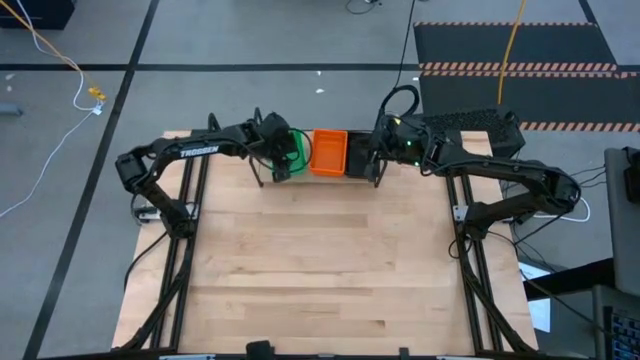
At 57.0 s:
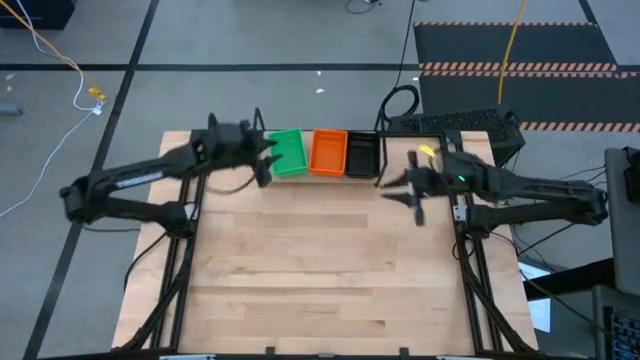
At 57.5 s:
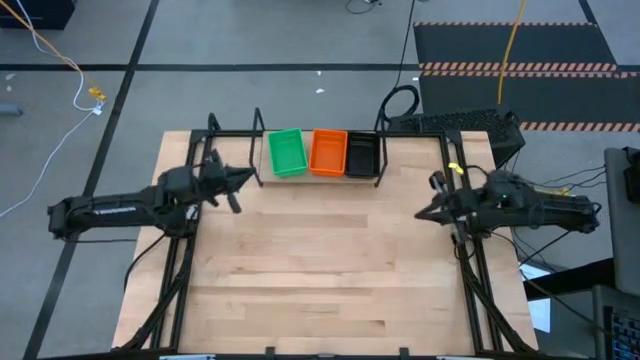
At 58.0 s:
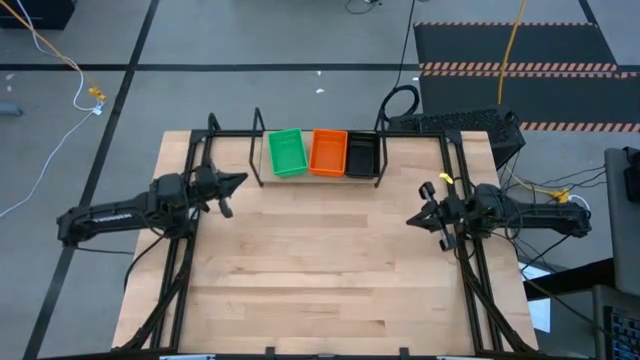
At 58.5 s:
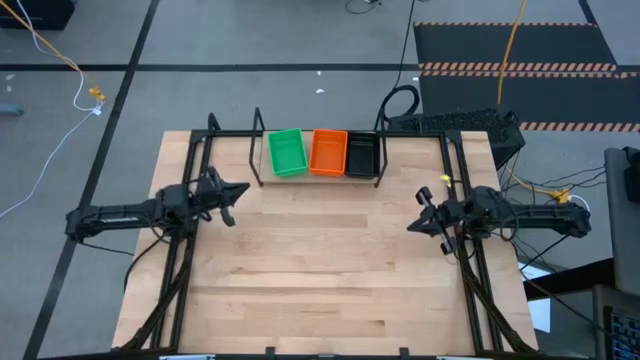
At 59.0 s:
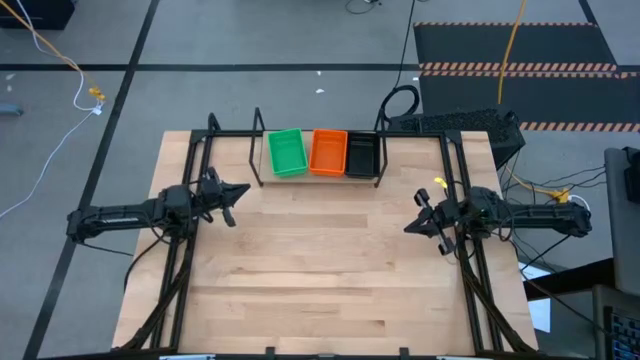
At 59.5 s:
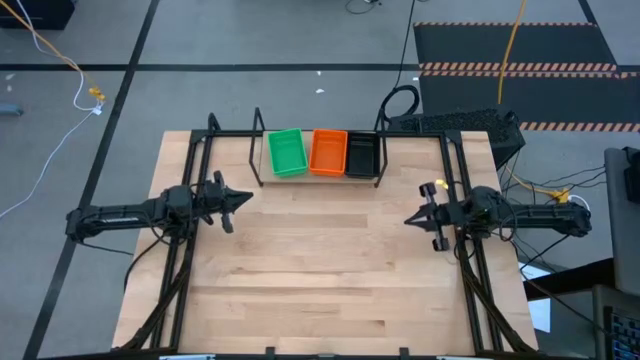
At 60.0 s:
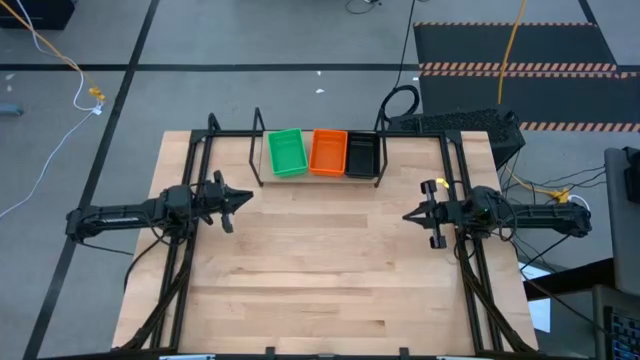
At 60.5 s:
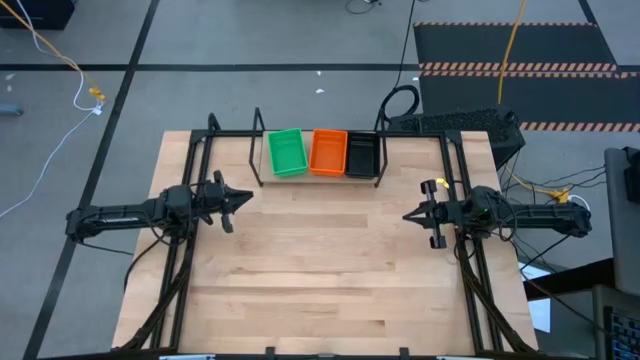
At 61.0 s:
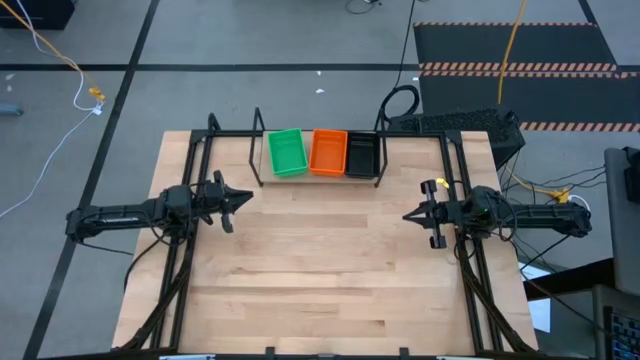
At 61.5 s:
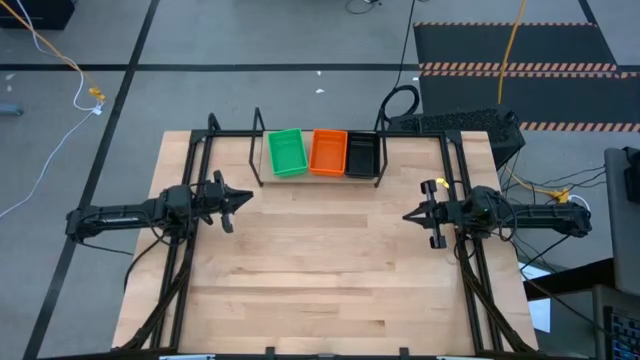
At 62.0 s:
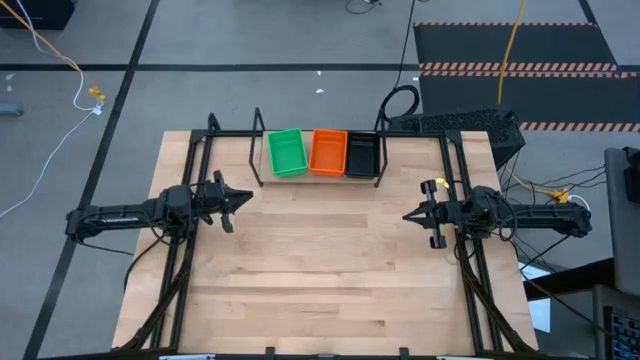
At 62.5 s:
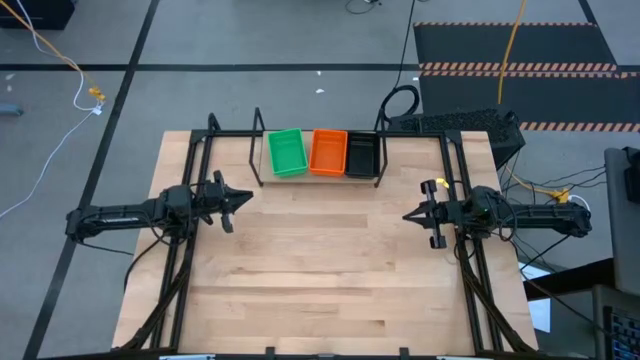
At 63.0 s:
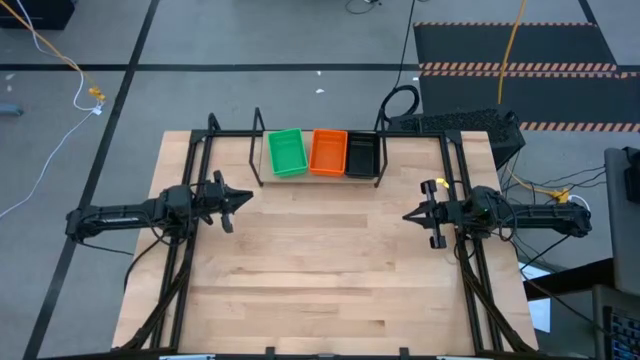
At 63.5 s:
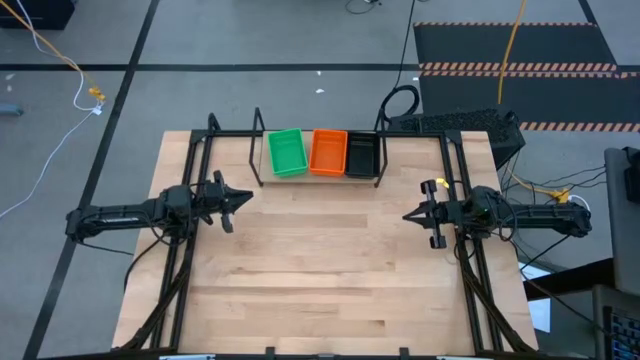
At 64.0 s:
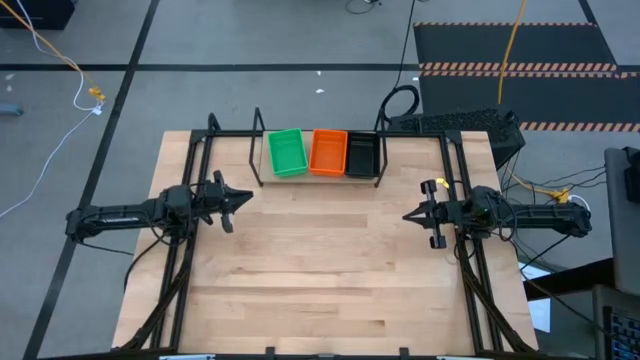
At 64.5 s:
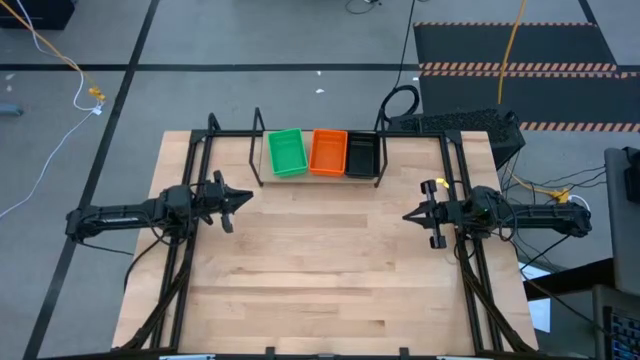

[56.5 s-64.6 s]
Task: Stack baskets on shelf by color
Return to Home Position

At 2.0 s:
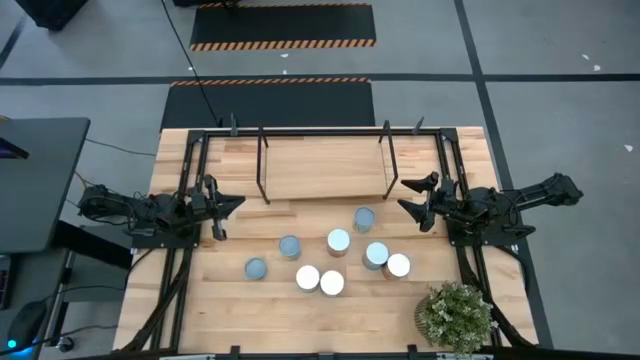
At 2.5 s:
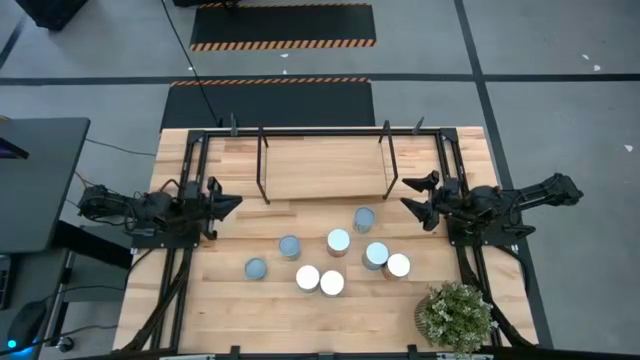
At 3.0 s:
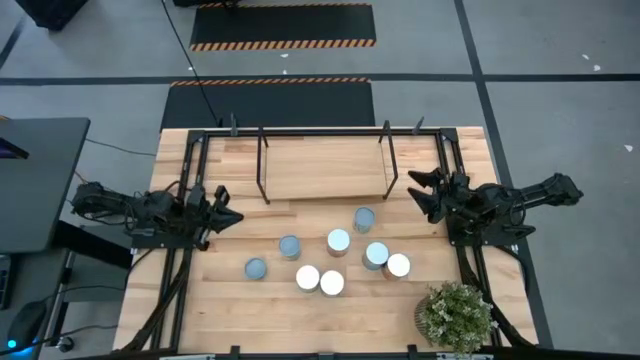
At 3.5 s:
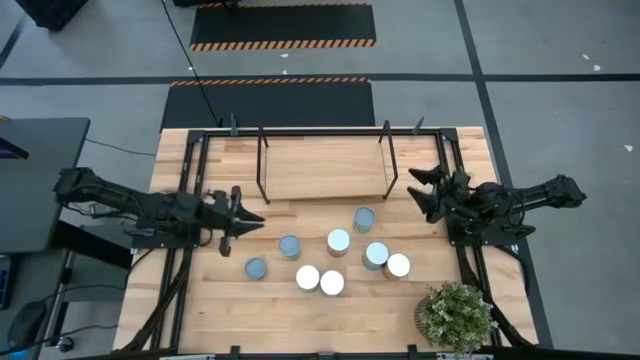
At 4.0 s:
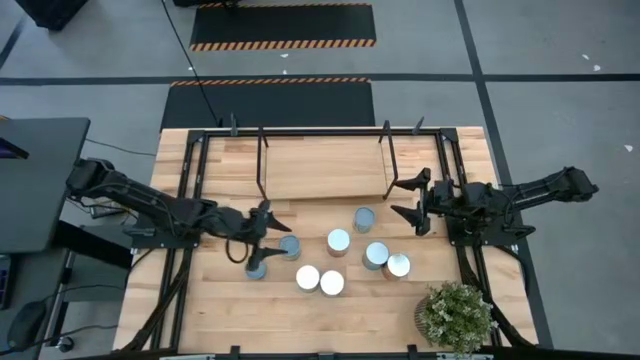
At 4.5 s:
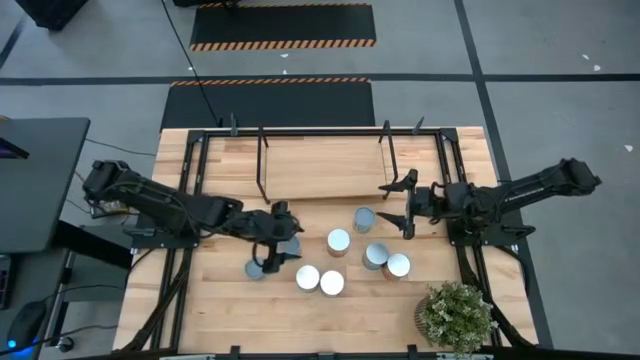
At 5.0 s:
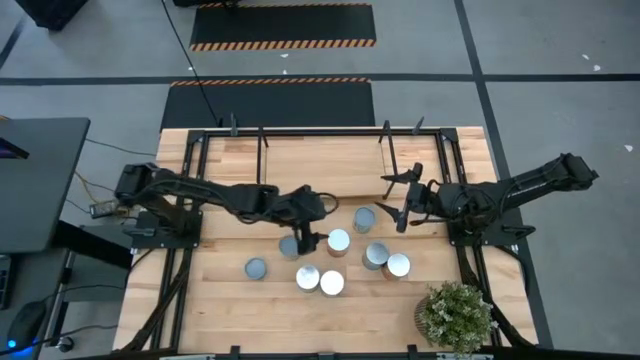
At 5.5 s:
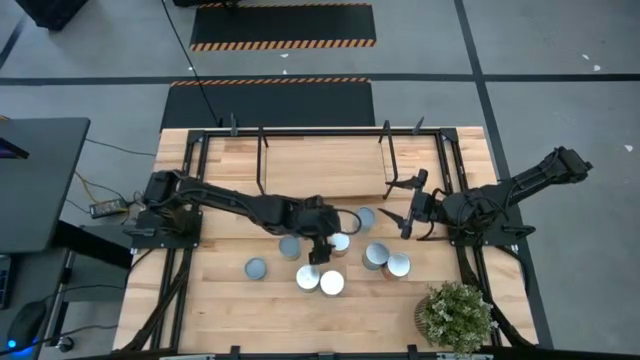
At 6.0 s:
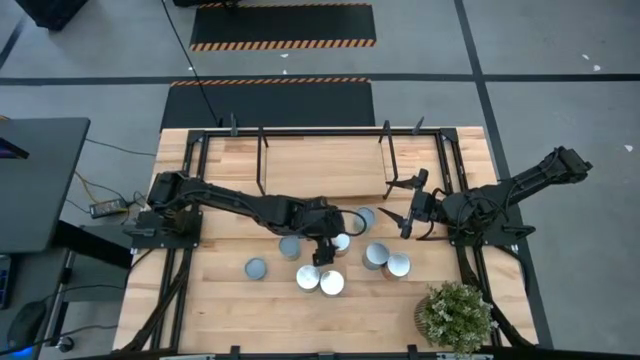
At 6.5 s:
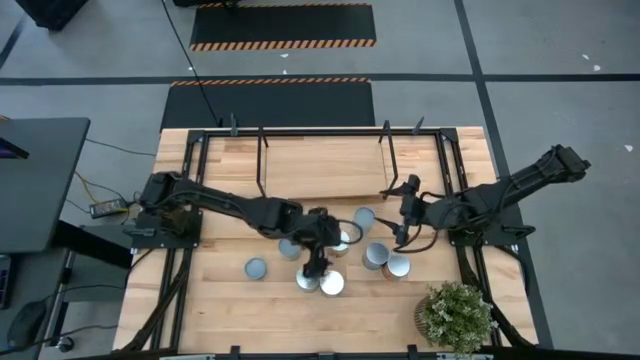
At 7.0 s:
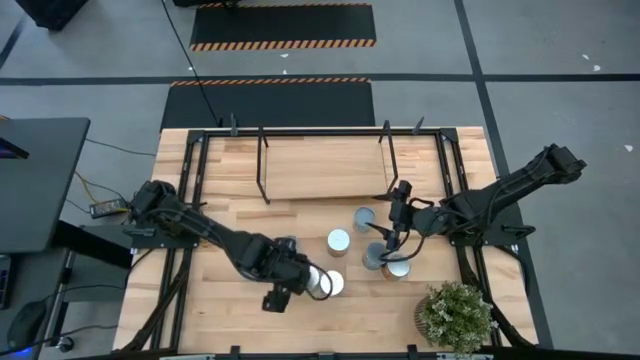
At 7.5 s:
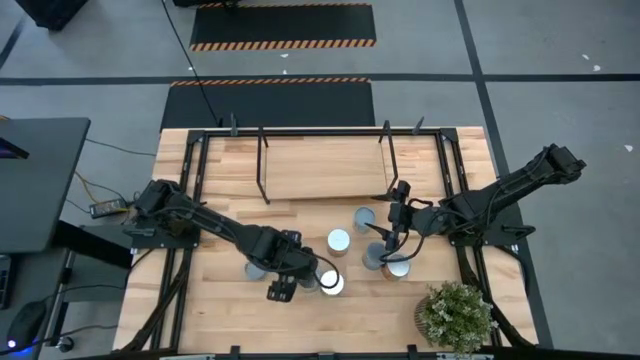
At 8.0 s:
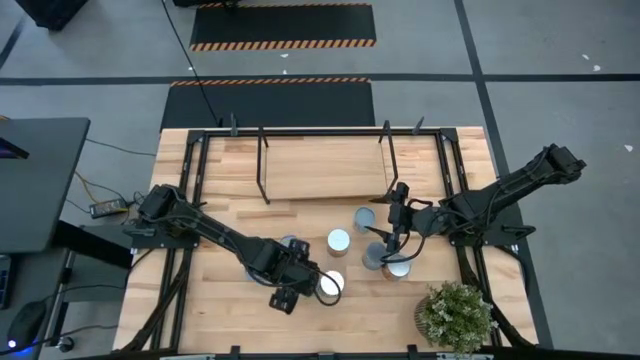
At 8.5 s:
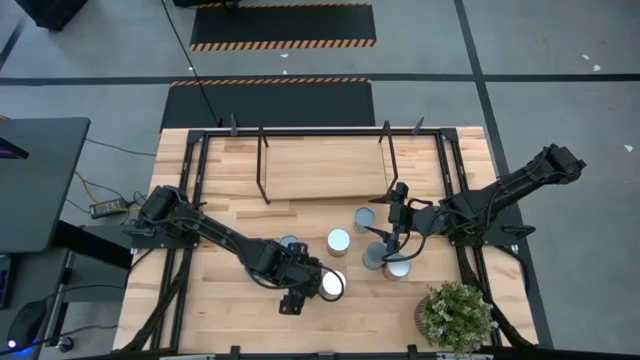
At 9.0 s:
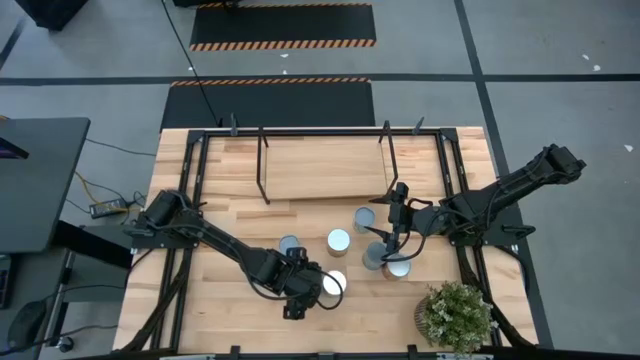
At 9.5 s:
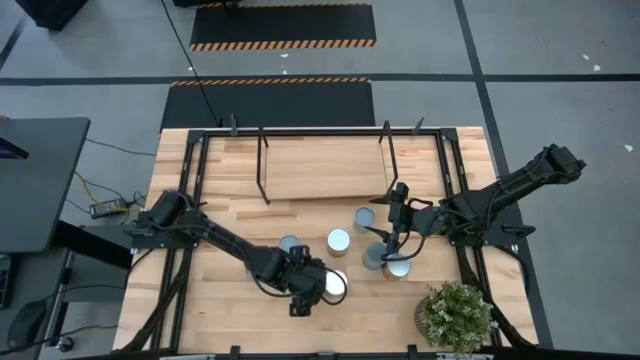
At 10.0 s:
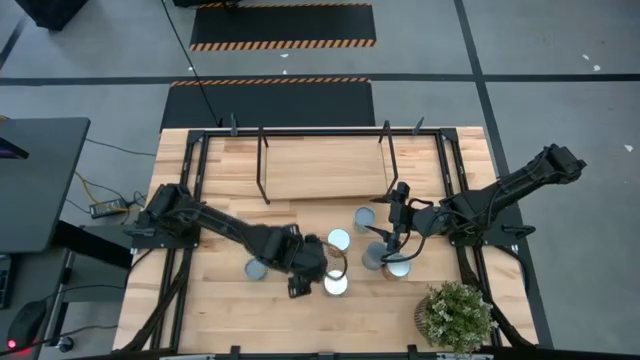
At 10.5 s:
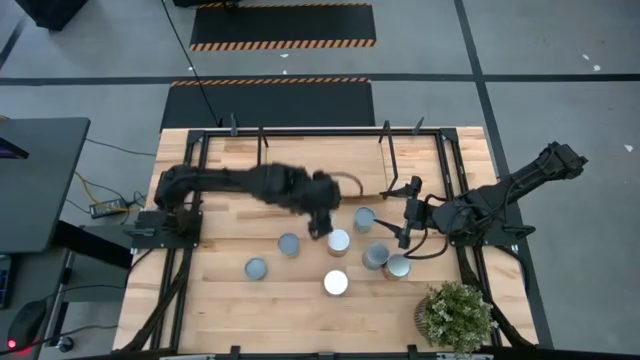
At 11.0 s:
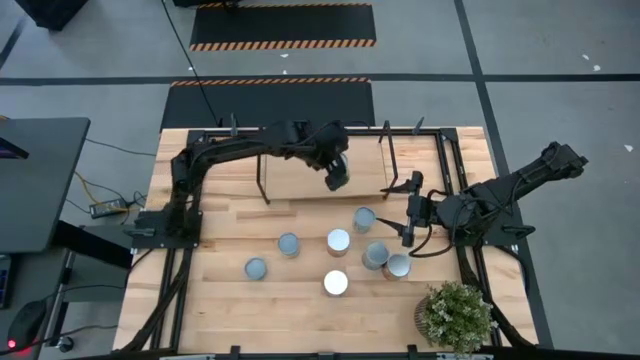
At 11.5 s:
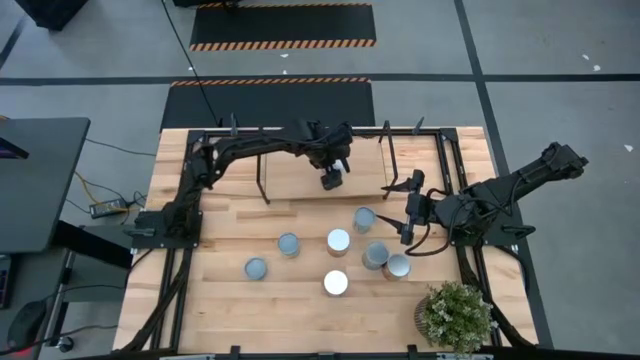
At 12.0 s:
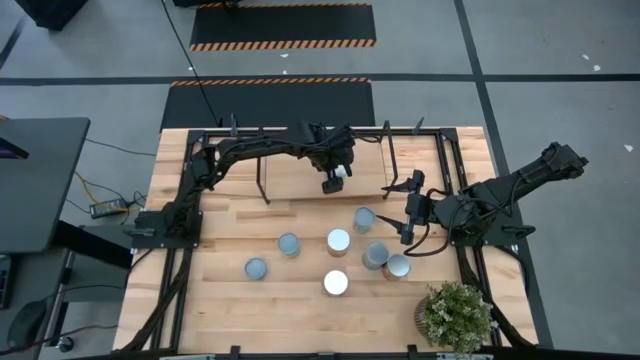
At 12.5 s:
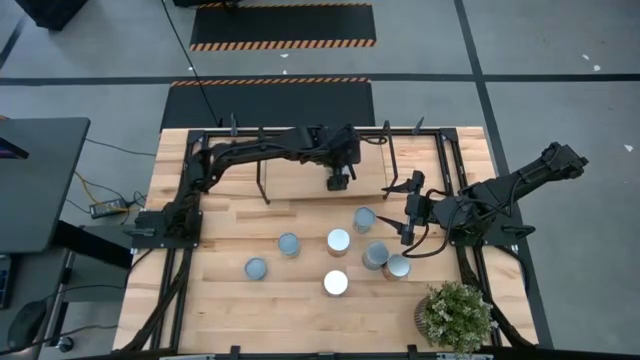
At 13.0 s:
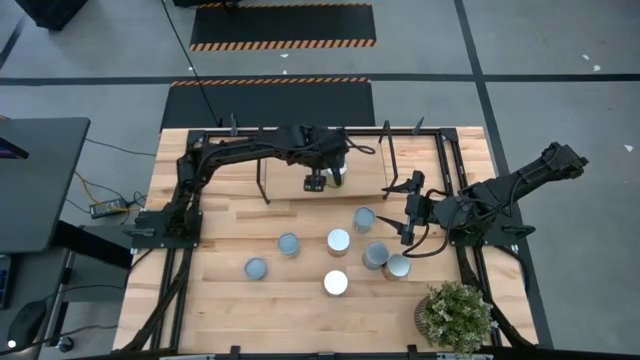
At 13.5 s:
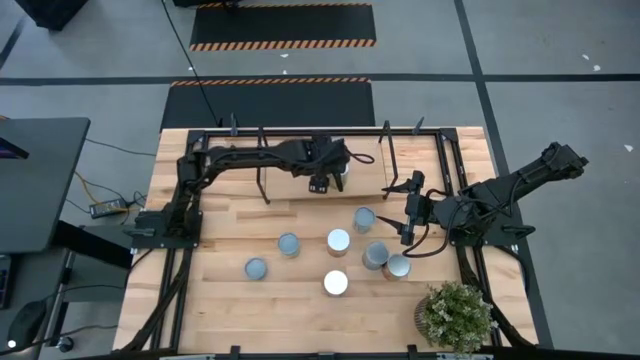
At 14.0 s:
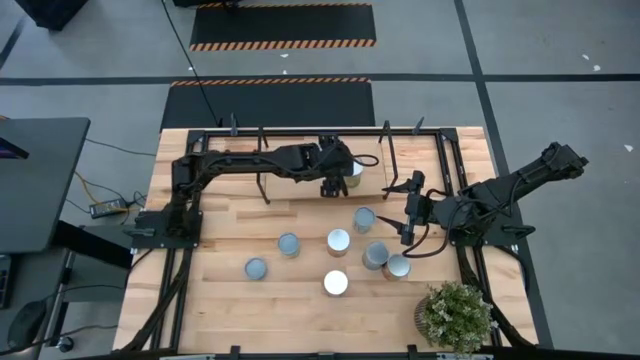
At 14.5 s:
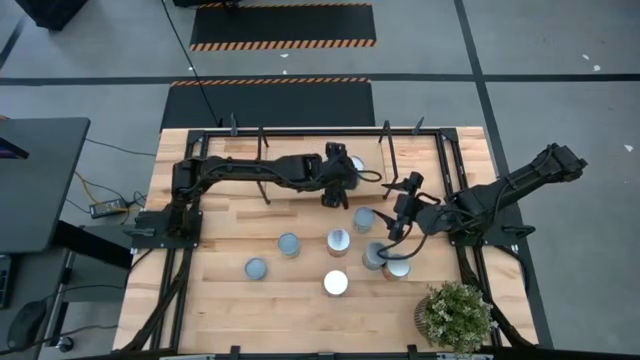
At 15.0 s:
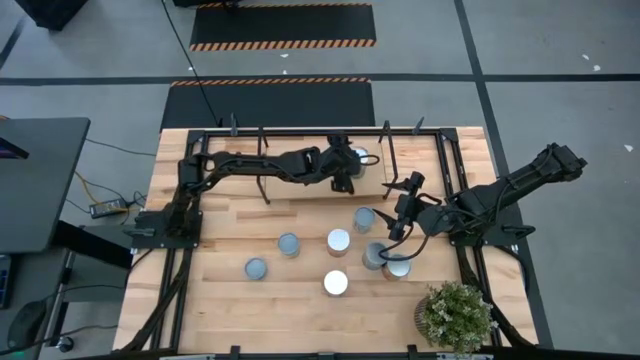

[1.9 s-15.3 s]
Task: Pick and place cans onto a shelf
Put the canned oranges on the shelf
